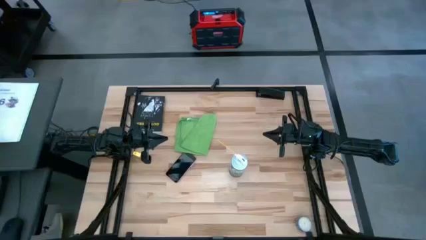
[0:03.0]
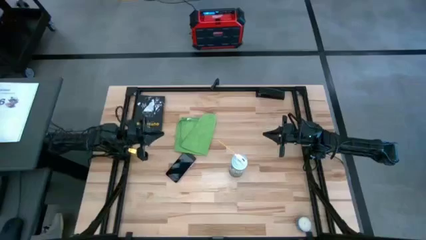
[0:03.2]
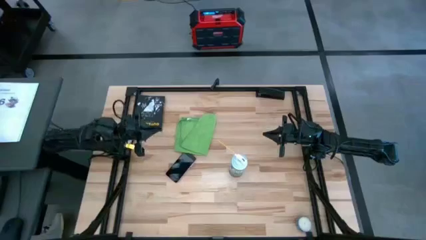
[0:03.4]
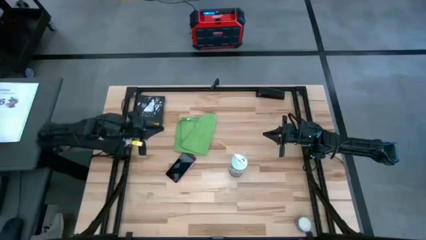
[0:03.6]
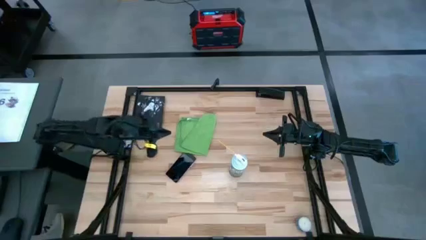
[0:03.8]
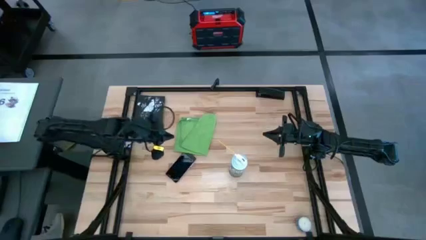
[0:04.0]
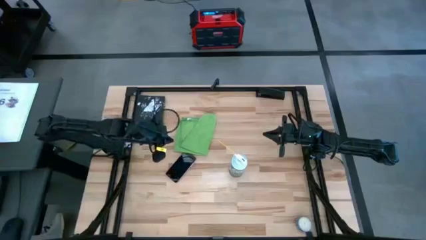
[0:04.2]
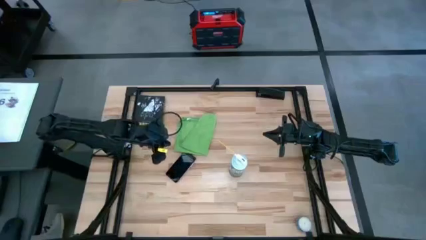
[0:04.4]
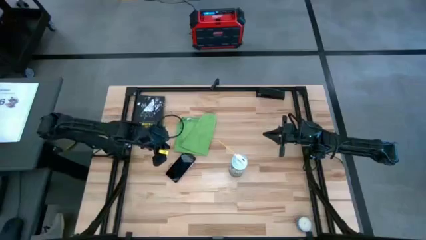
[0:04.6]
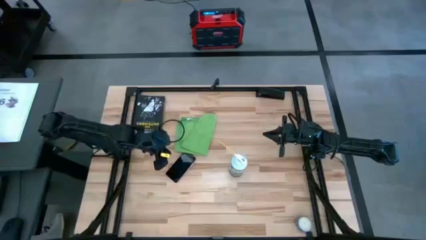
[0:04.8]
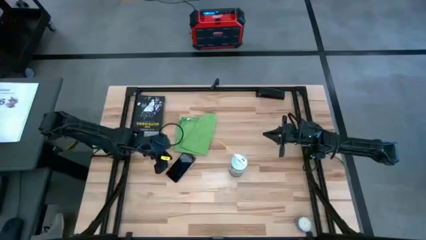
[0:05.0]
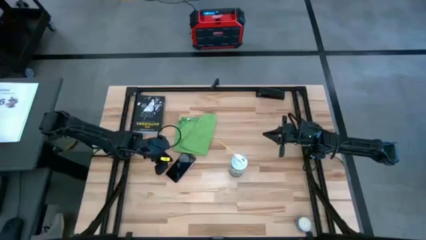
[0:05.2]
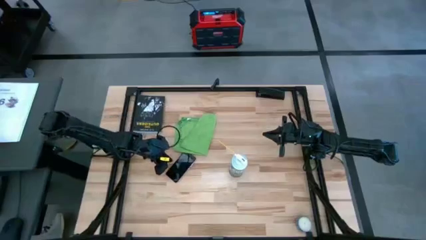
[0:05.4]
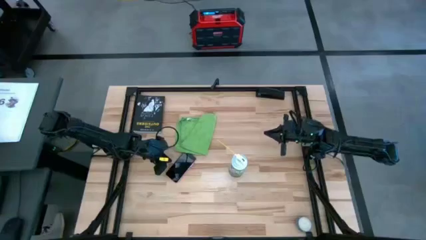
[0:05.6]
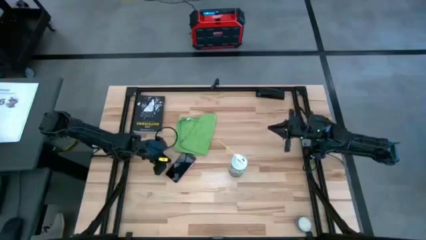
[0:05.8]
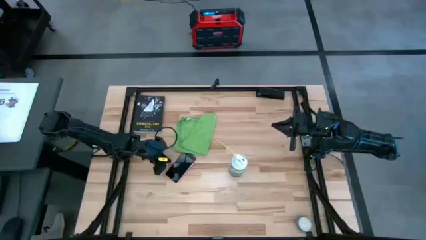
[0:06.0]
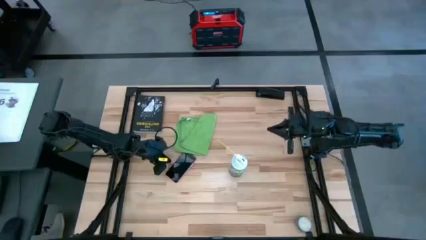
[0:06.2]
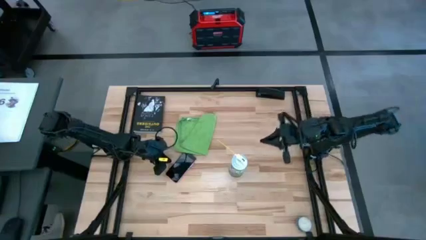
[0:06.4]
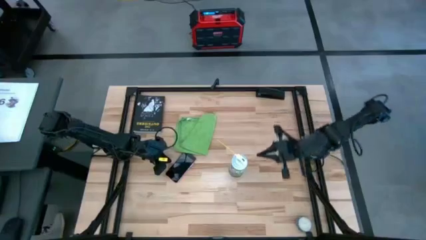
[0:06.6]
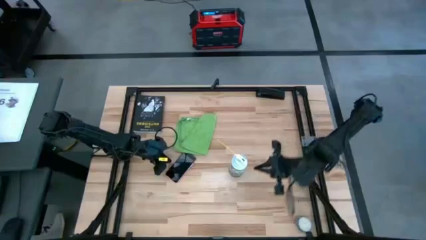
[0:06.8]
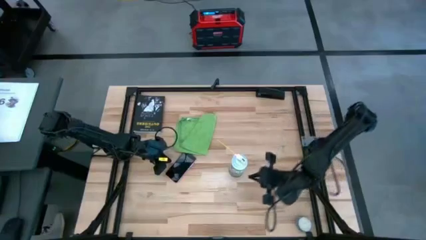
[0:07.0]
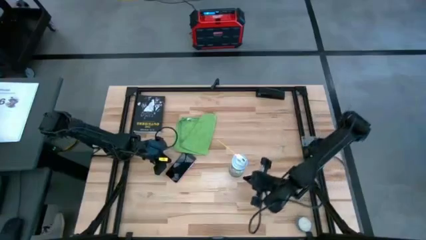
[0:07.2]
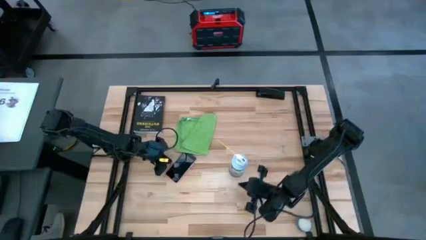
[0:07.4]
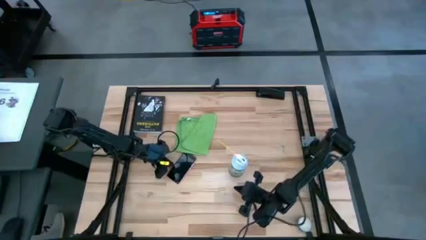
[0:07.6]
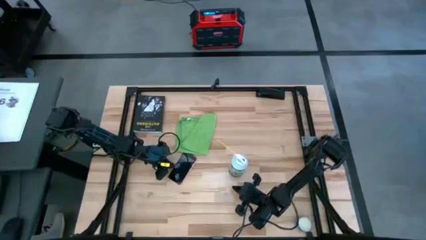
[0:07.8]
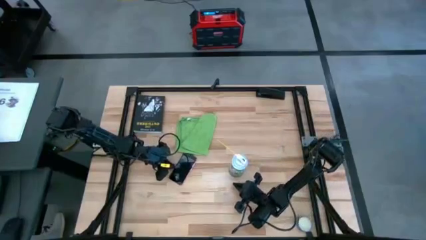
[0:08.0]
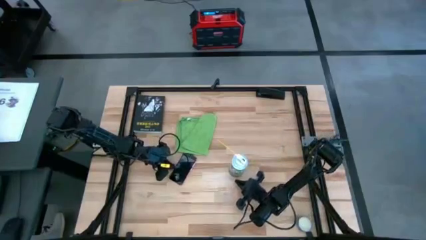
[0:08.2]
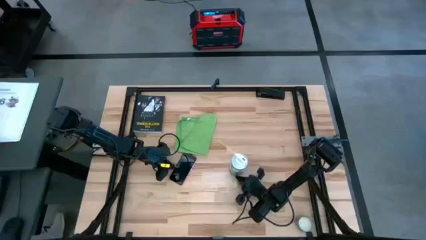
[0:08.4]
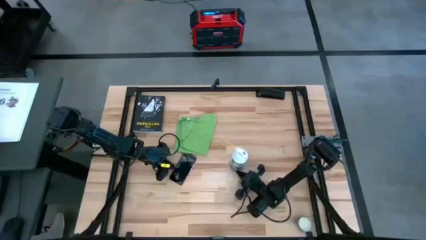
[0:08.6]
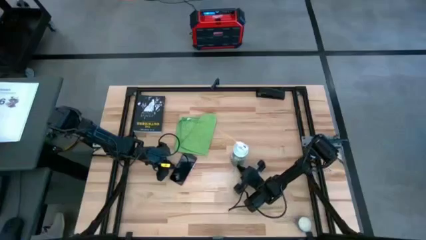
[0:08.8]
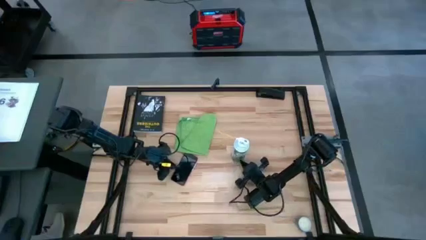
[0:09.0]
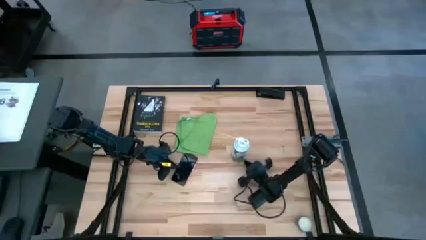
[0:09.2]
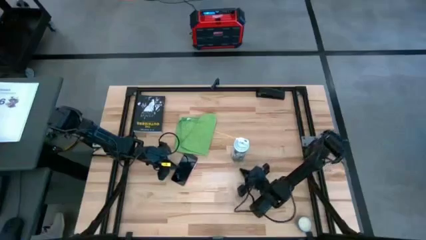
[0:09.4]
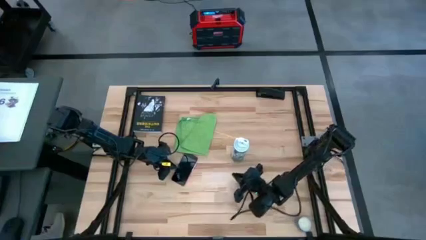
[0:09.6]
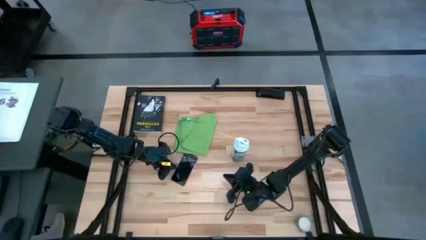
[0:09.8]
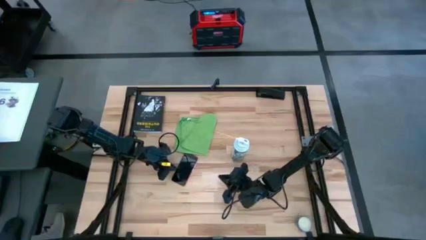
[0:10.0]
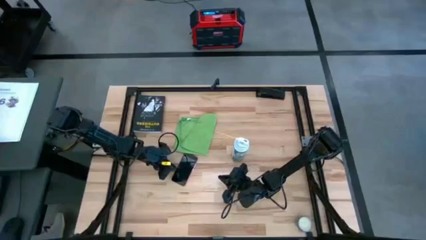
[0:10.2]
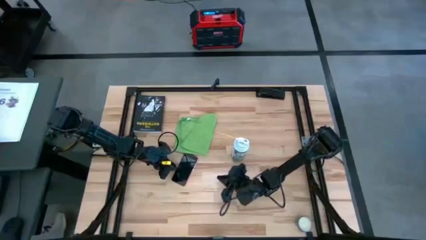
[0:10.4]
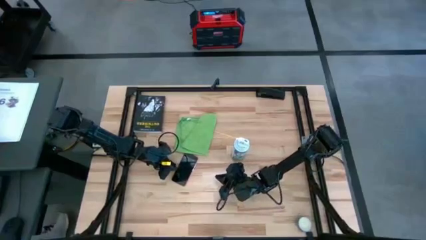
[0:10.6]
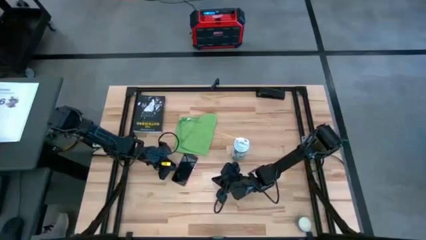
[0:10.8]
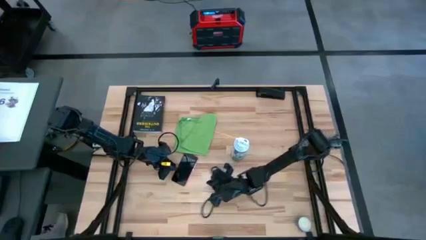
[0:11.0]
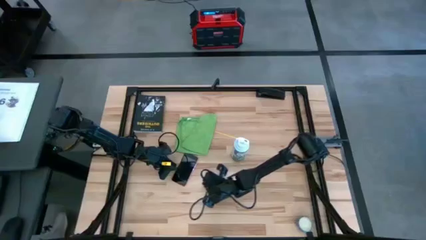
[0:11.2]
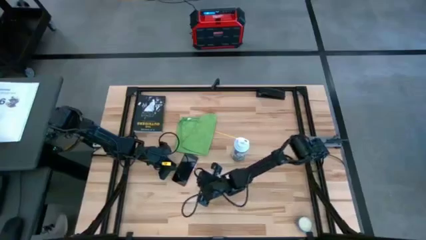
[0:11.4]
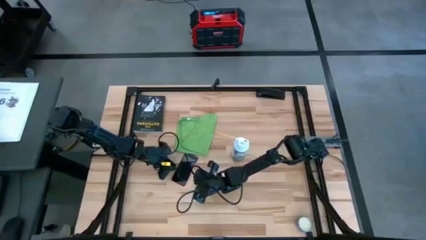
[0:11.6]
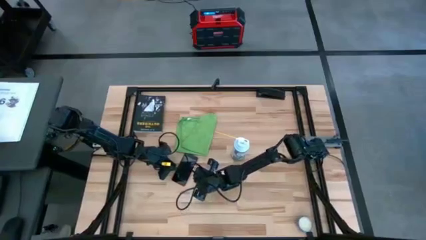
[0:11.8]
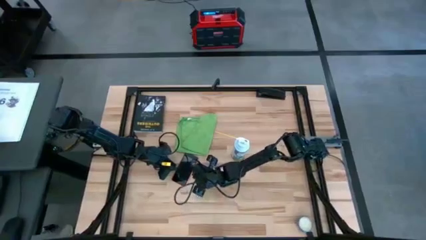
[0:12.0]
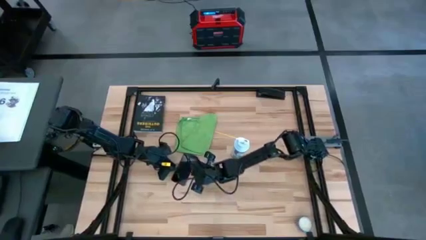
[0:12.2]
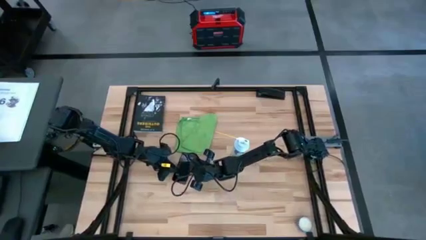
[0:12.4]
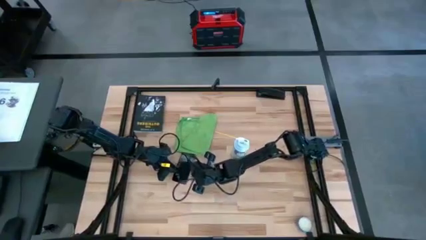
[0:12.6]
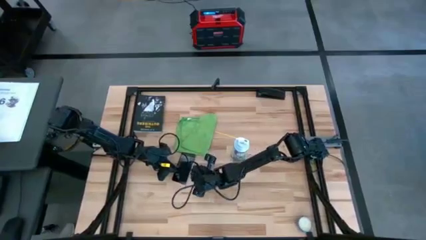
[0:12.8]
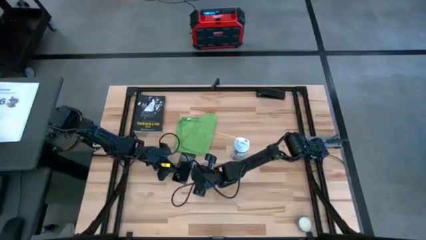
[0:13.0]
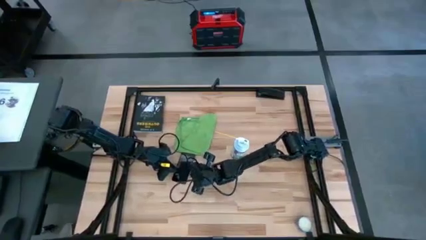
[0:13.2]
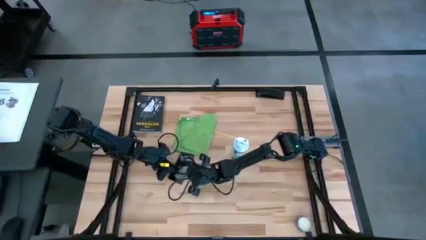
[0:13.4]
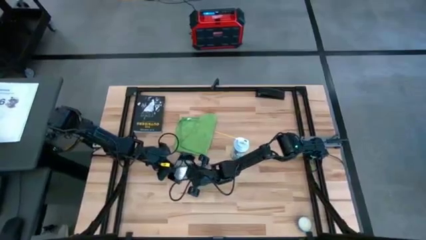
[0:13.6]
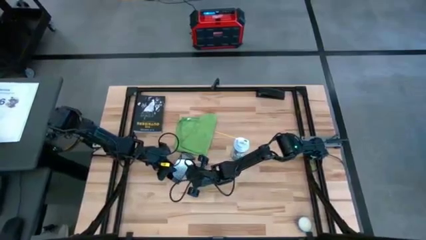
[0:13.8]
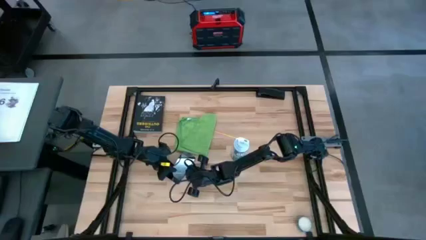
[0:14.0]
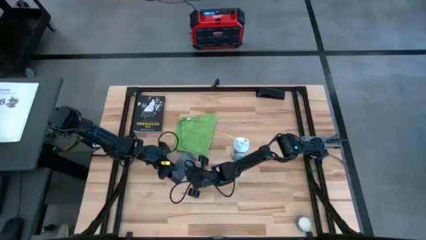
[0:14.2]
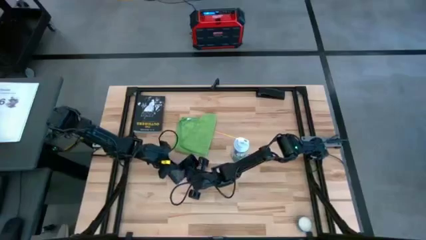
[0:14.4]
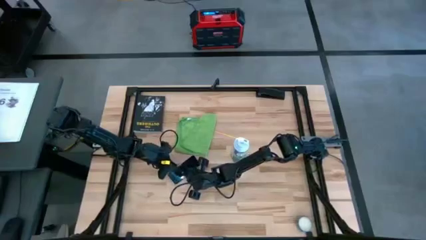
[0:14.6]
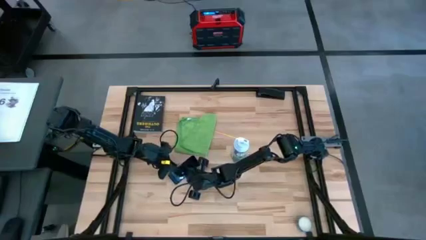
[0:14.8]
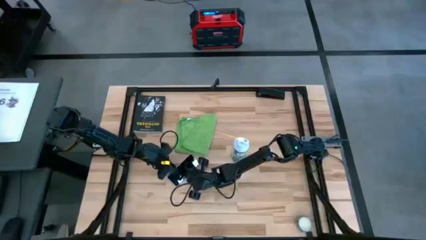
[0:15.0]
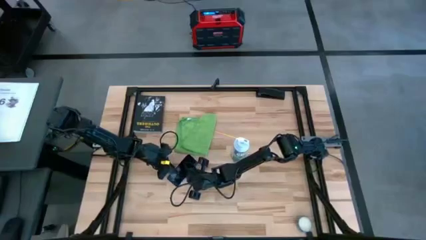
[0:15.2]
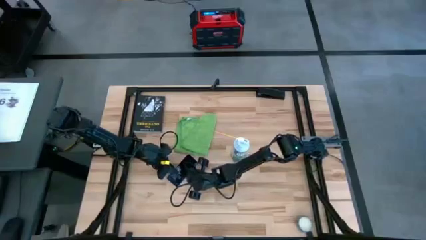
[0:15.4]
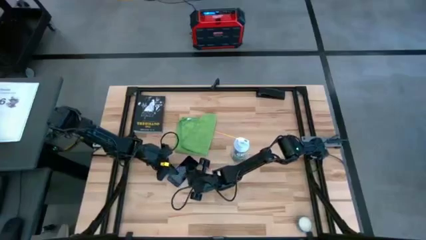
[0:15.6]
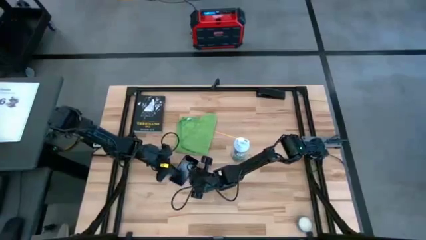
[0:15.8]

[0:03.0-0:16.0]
Task: Apply microfiber cloth
Spray the pink cellphone using the spray bottle

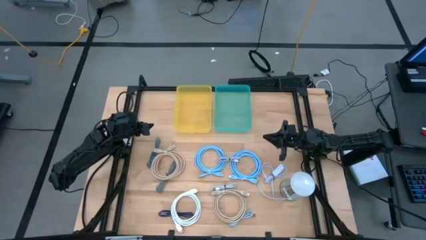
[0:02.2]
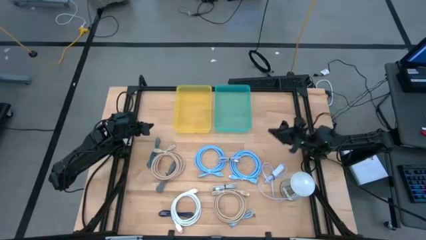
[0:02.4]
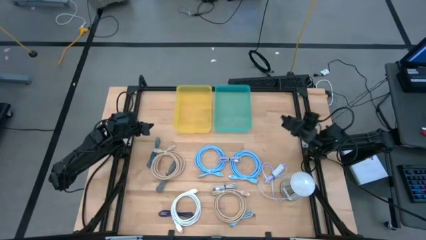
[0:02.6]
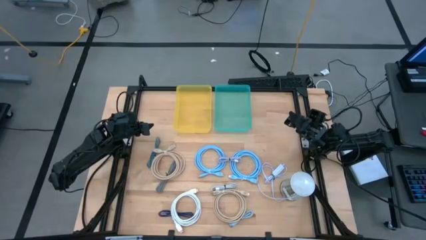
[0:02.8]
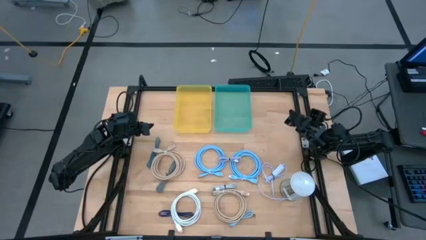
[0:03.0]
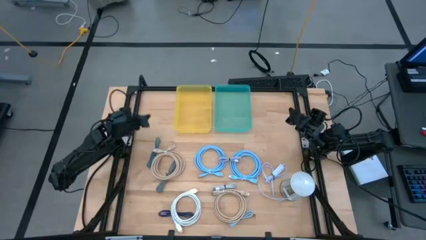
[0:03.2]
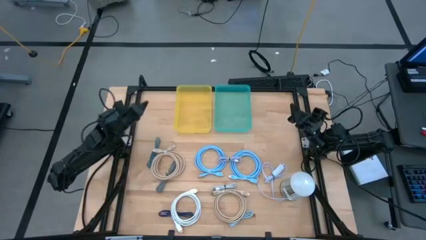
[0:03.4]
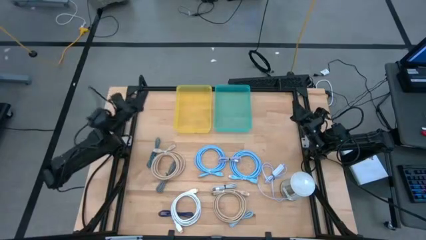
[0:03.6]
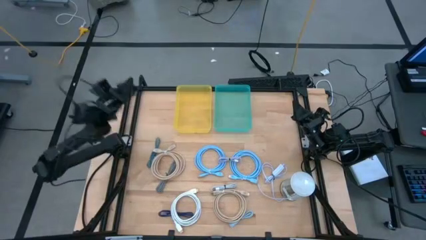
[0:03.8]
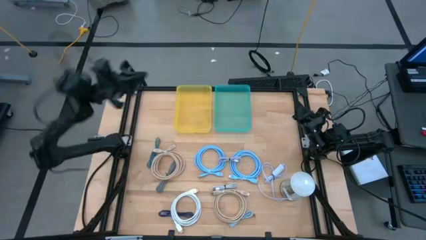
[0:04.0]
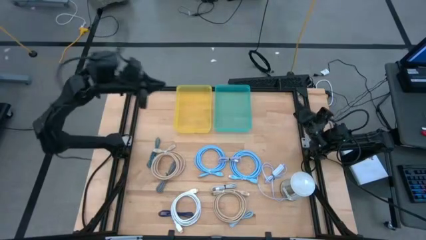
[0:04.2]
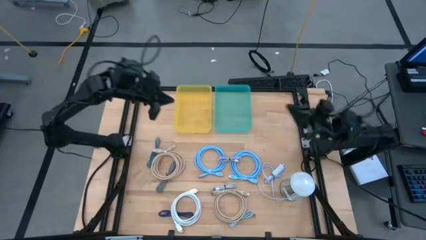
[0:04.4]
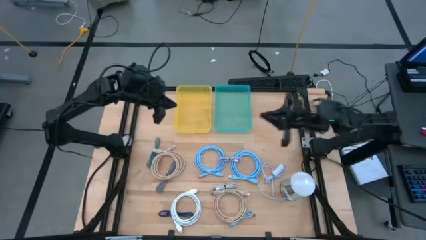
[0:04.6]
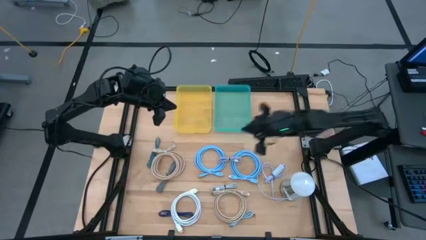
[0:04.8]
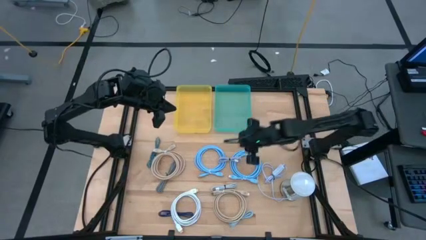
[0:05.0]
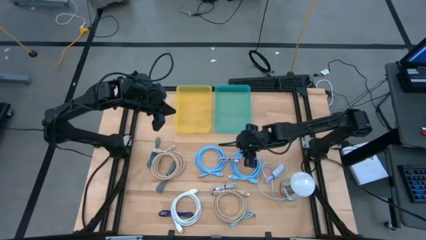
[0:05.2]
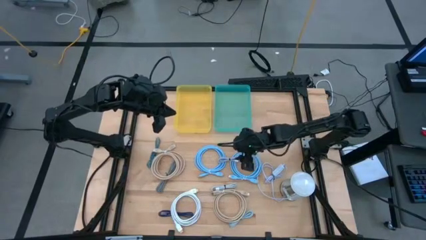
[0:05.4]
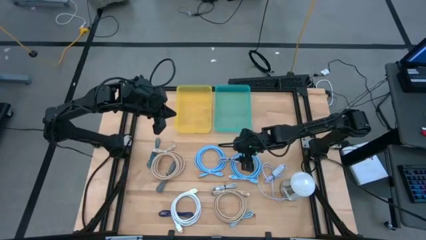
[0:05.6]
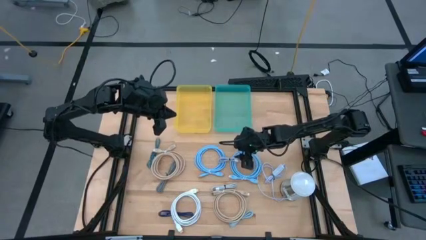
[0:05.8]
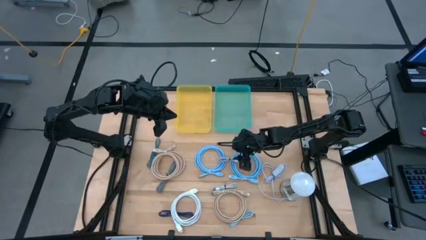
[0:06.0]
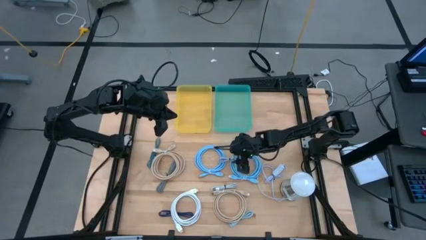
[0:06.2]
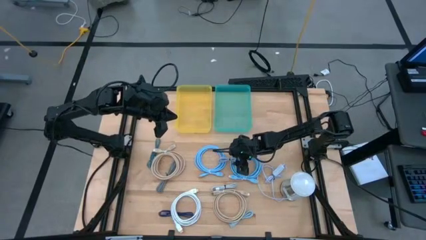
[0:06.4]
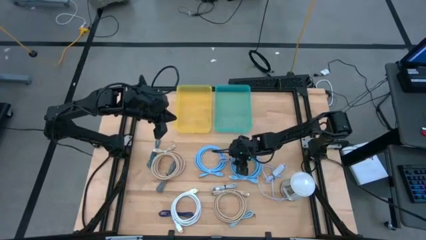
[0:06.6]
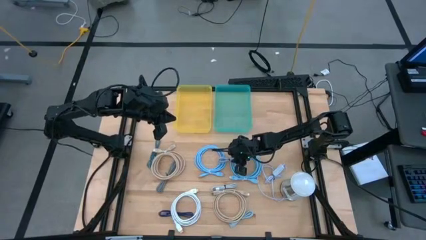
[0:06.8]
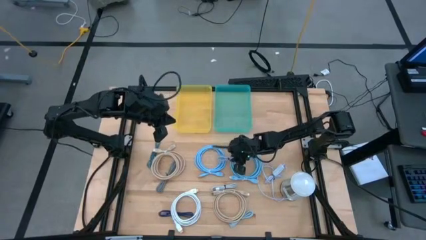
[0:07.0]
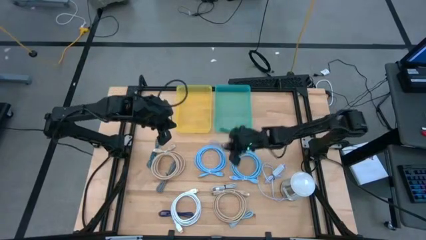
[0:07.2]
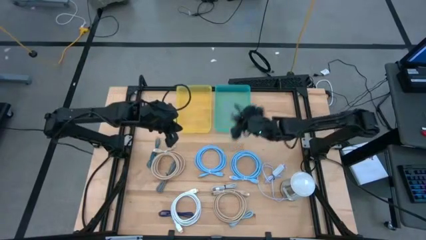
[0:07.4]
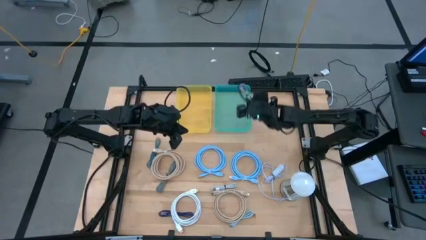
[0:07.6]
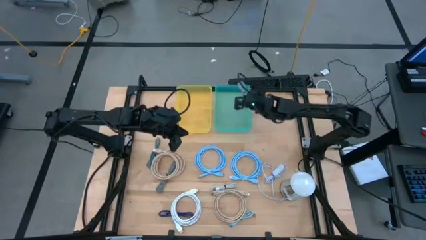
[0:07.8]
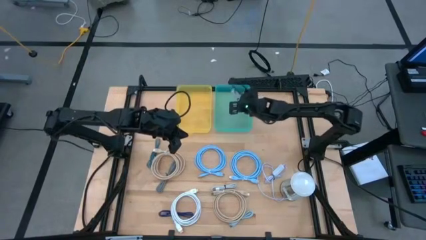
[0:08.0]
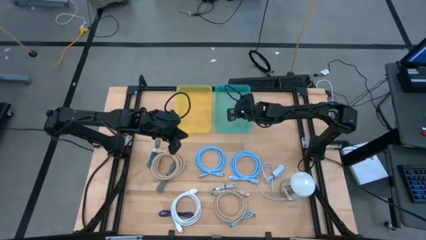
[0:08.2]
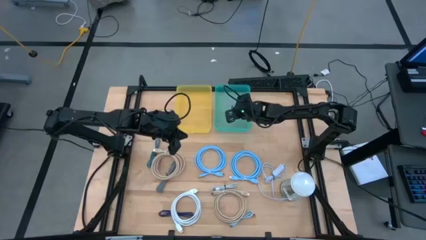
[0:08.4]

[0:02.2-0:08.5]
Task: Pick & Place USB Port
Put the purple charger cable into the green bin
